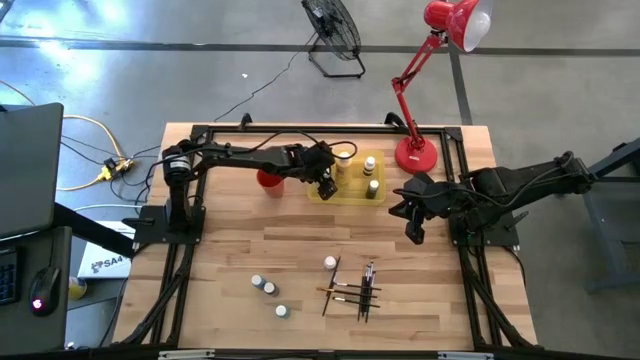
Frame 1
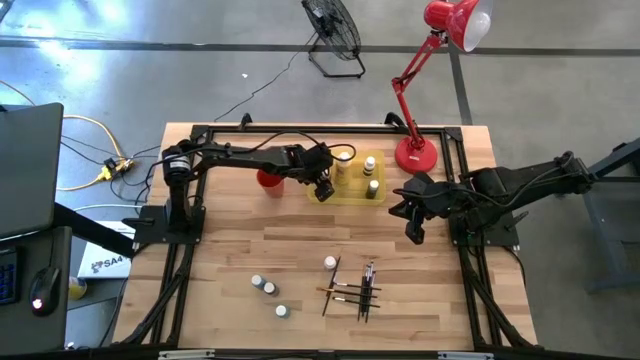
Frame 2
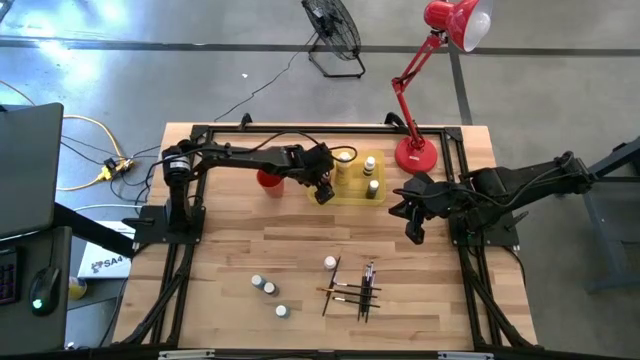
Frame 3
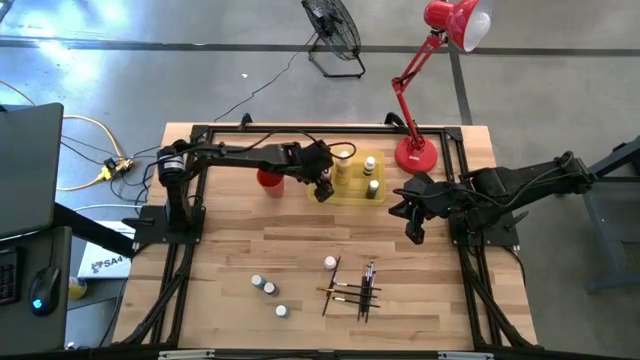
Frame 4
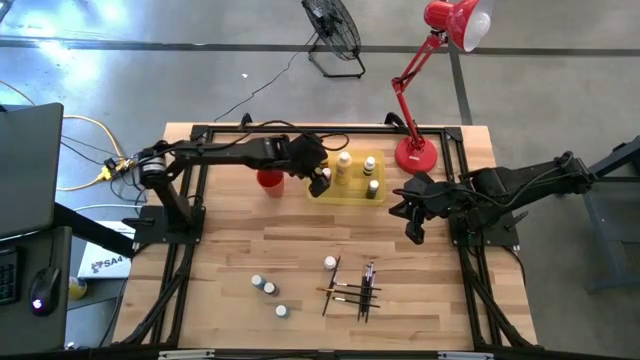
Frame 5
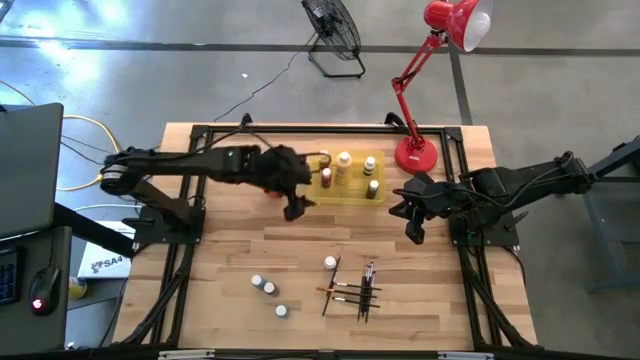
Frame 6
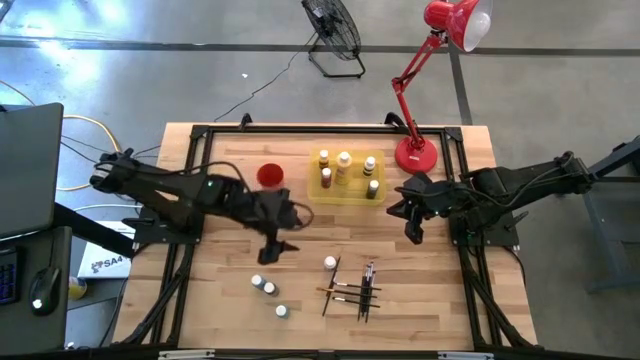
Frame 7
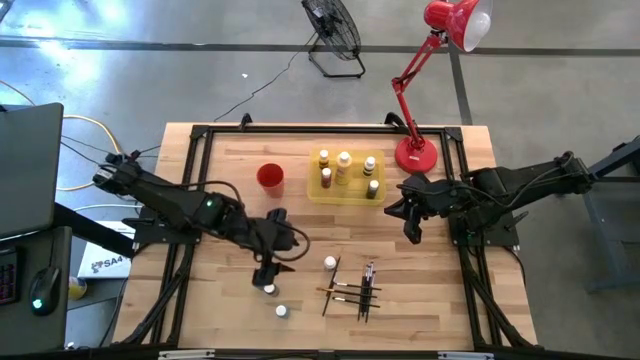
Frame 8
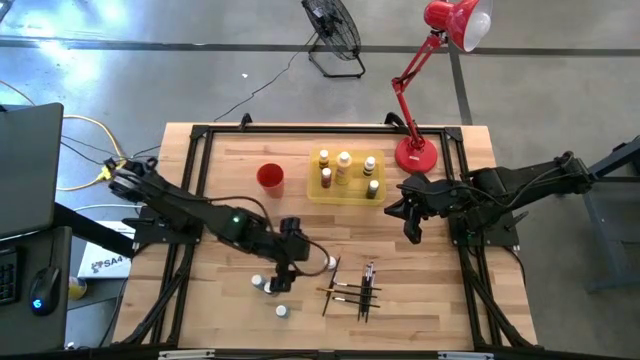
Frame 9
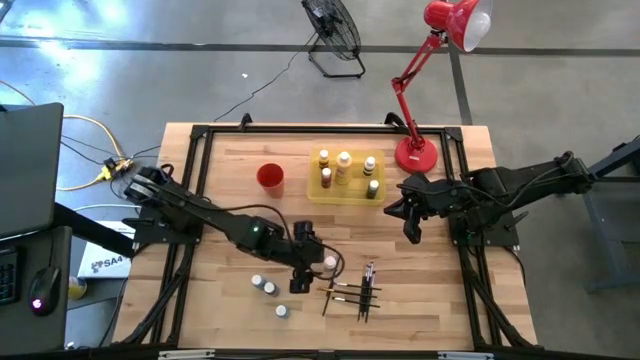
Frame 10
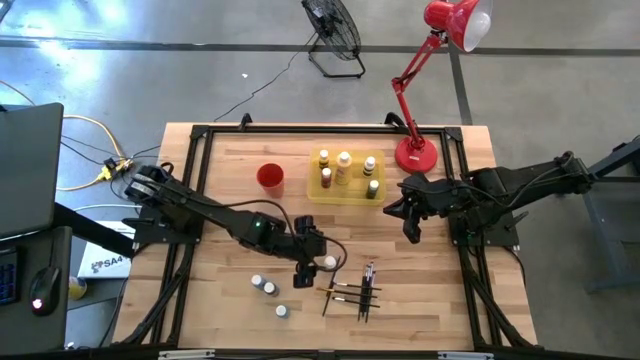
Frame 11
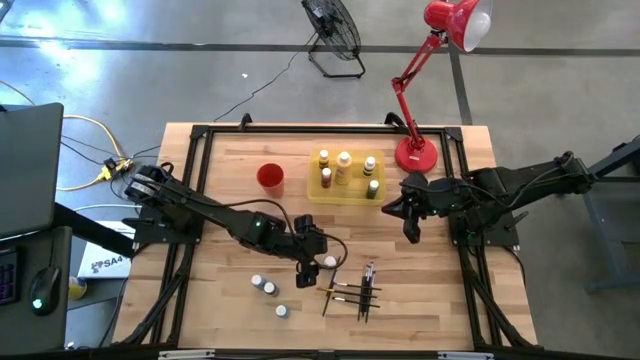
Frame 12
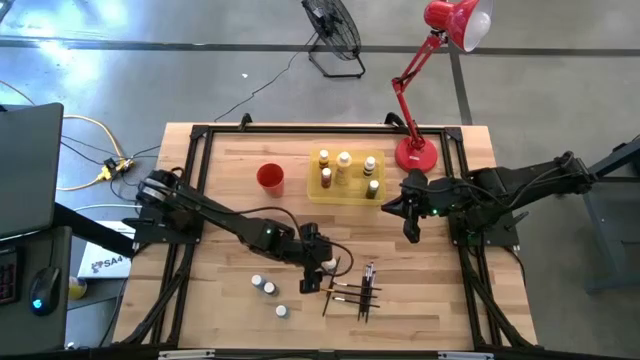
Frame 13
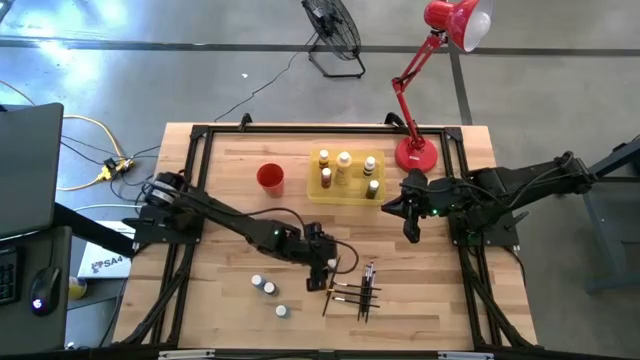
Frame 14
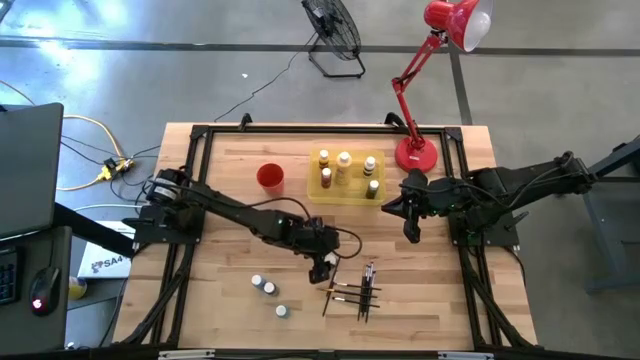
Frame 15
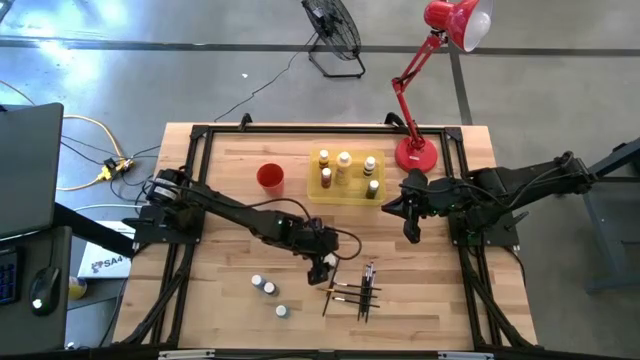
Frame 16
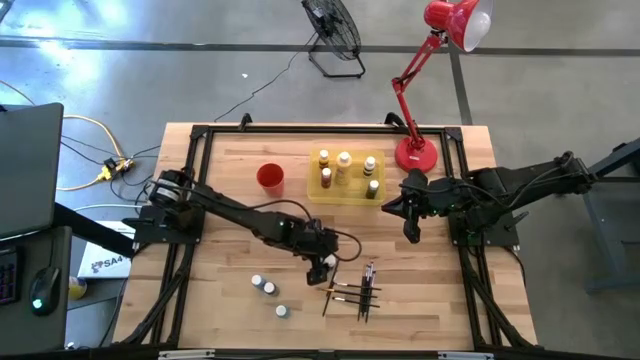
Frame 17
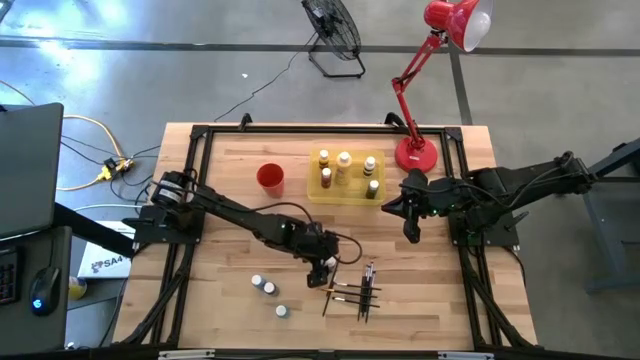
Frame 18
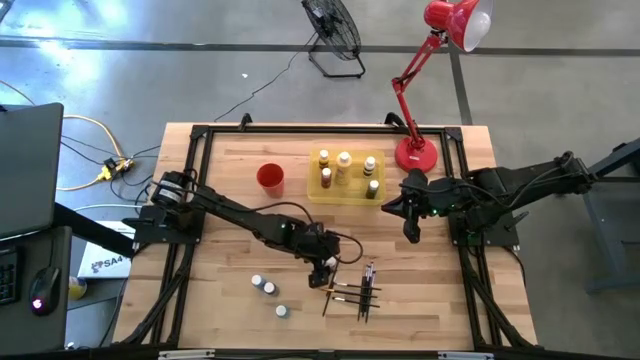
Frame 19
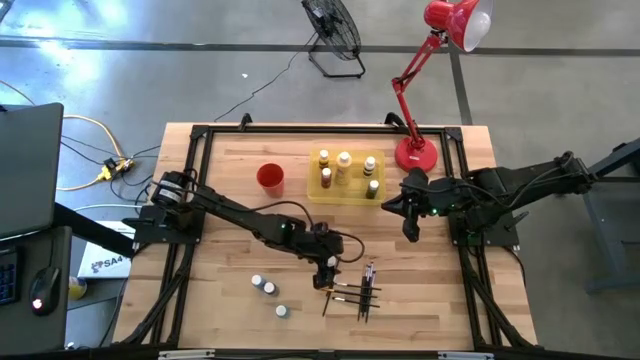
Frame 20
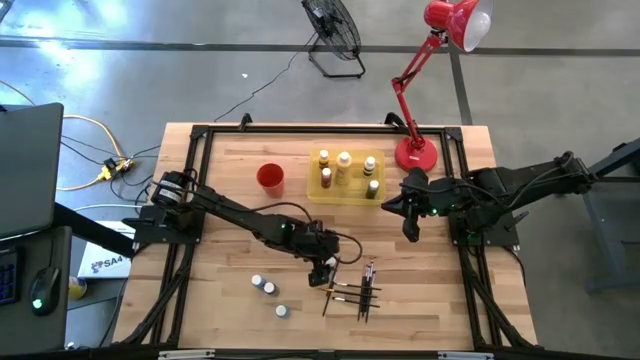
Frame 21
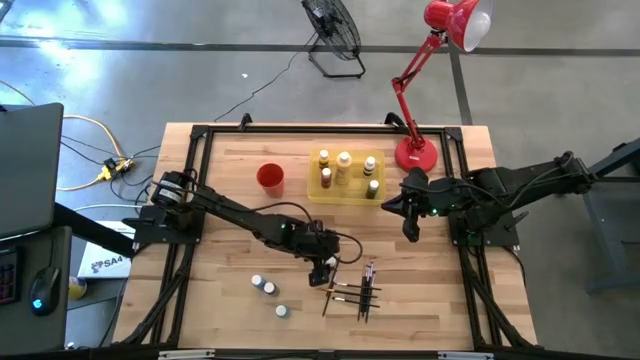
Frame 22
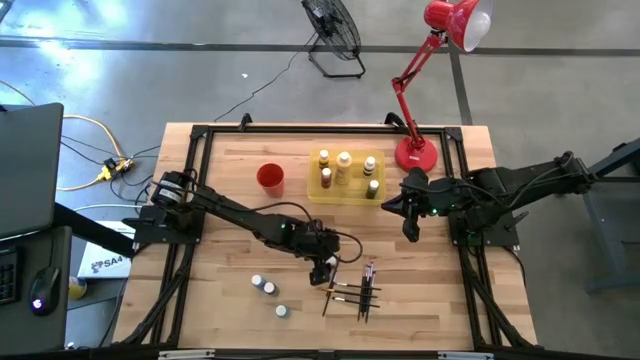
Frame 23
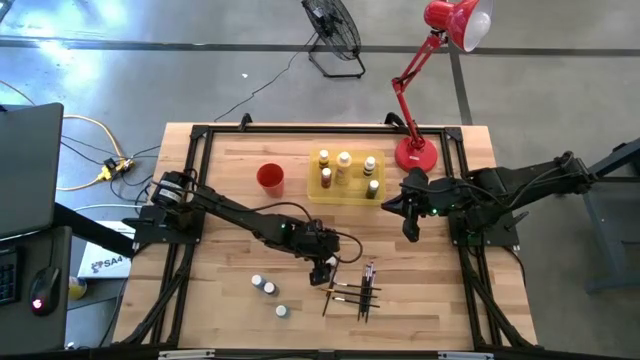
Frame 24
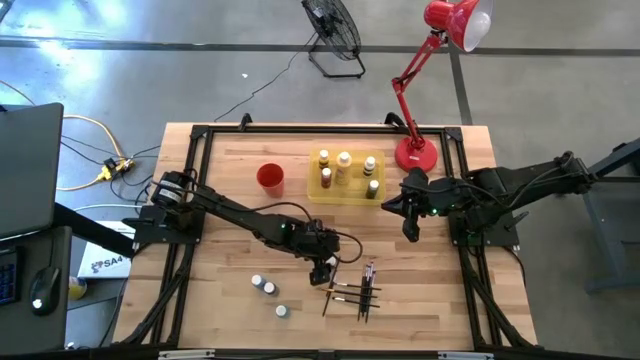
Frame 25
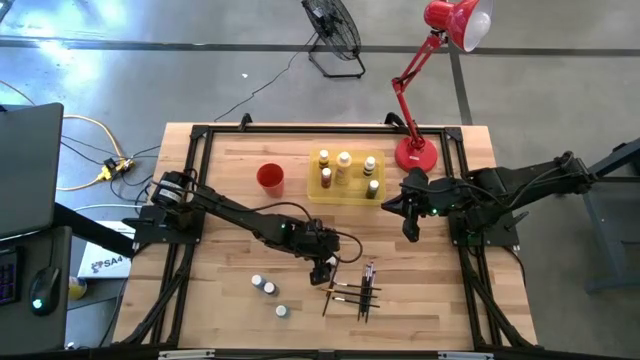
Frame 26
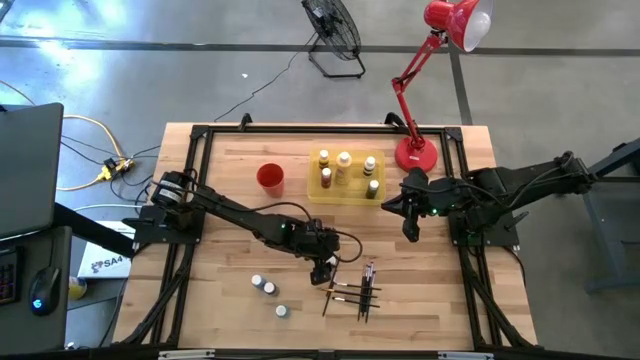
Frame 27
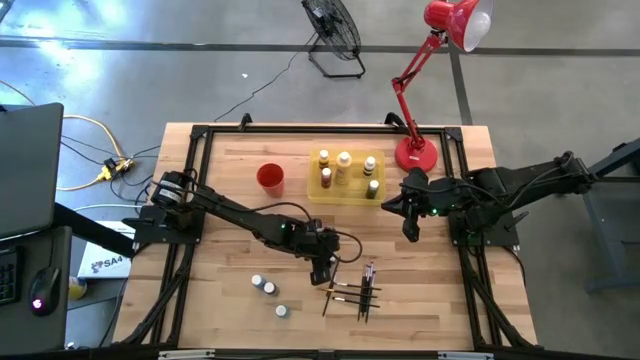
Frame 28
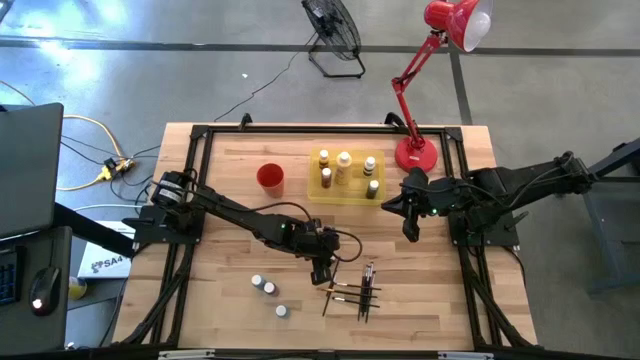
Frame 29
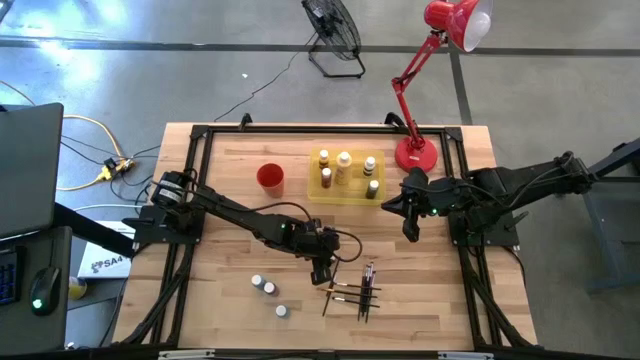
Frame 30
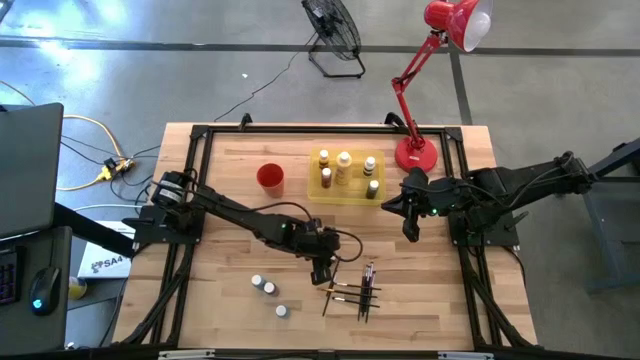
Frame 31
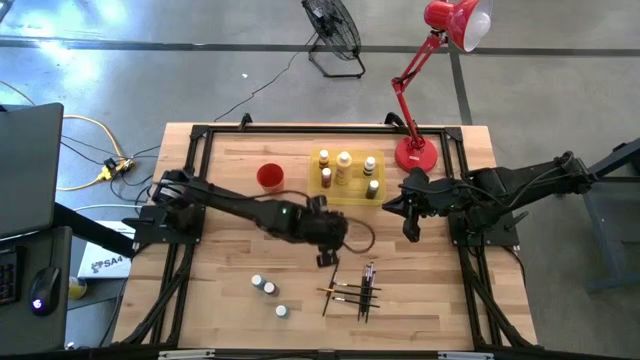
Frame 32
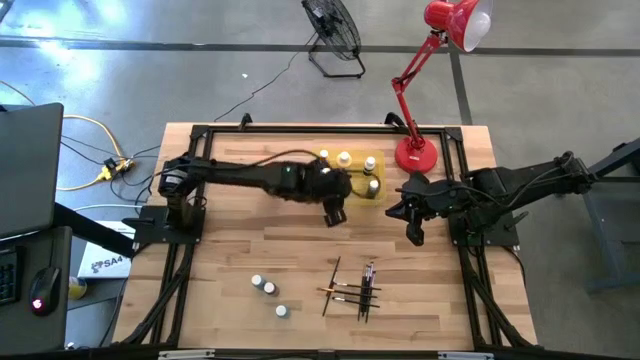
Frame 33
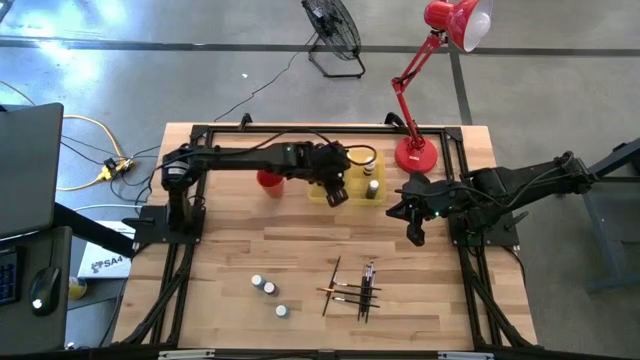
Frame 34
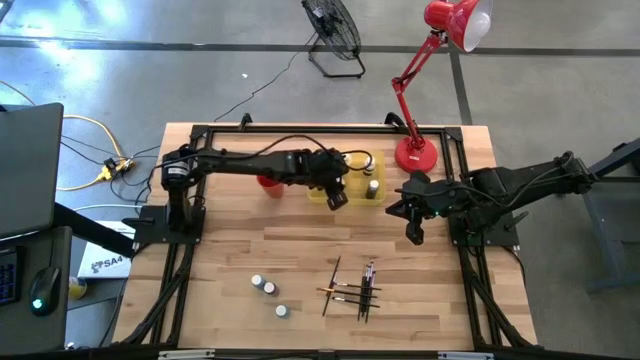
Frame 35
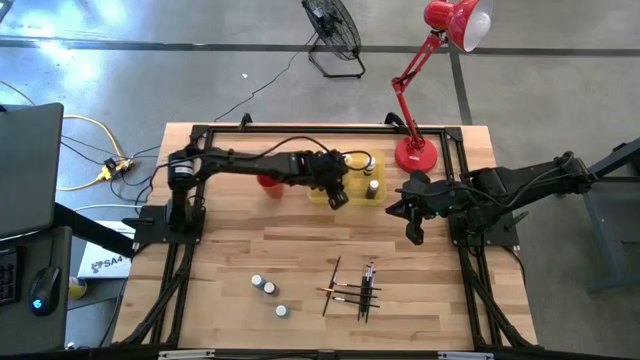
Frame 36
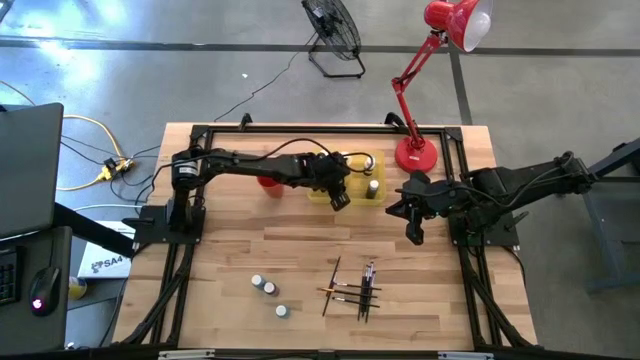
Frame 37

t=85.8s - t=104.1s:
Task: Pick & Place Paint Supplies
Put the white paint bottle into the yellow bin

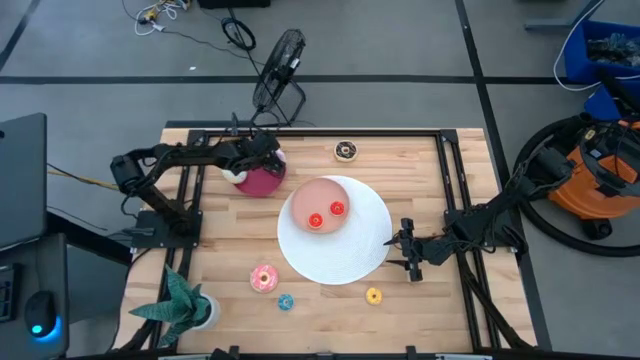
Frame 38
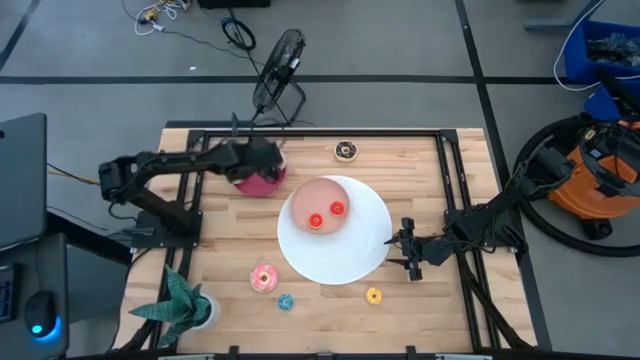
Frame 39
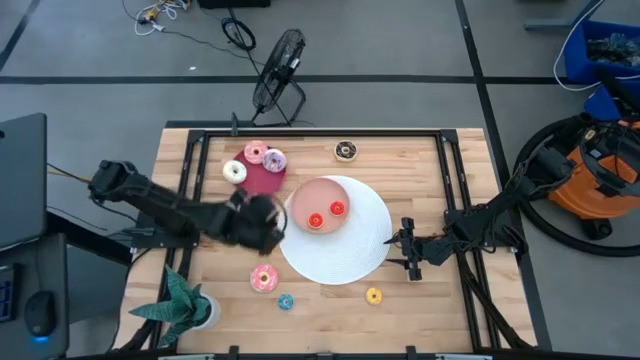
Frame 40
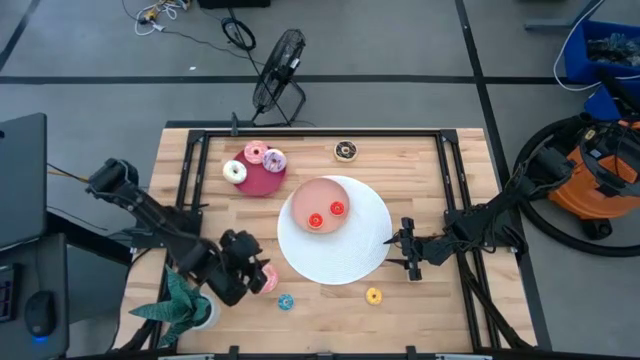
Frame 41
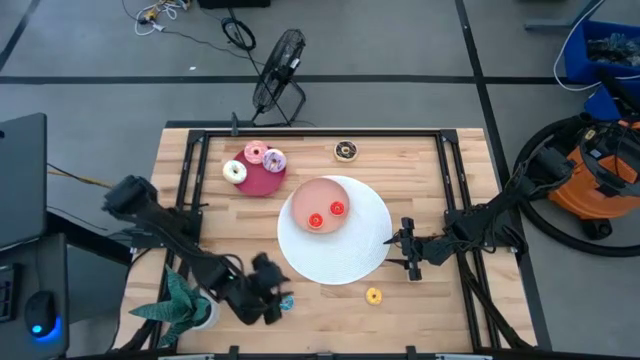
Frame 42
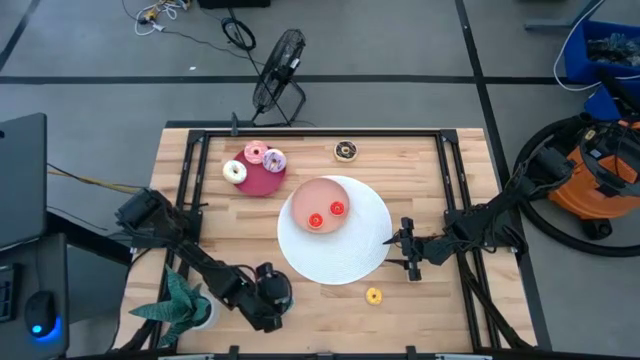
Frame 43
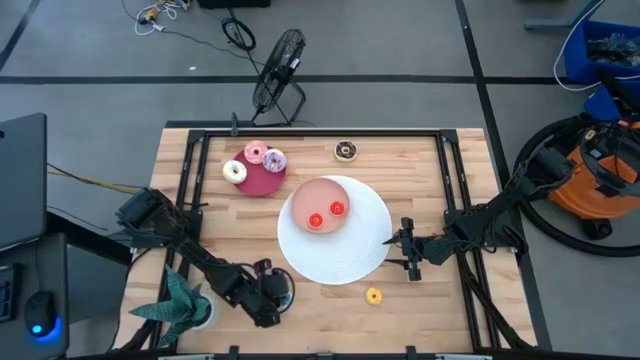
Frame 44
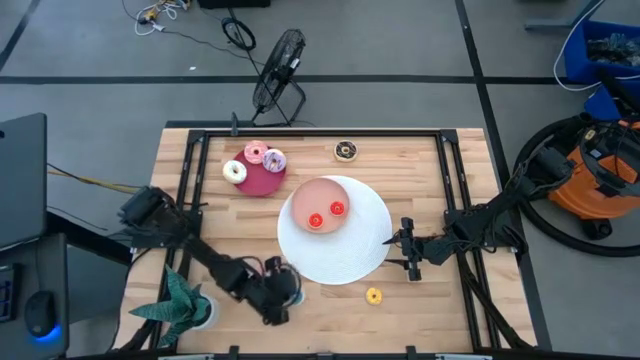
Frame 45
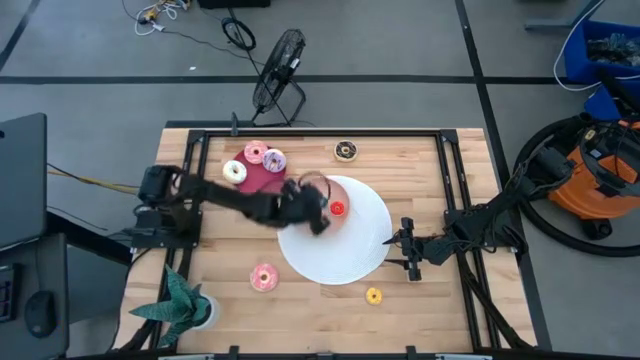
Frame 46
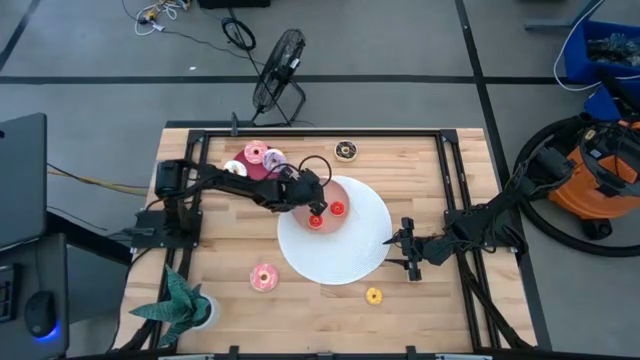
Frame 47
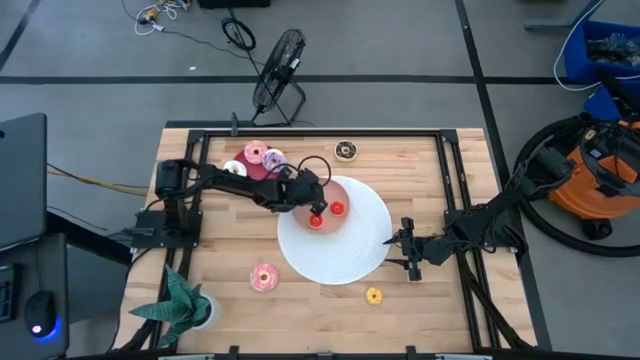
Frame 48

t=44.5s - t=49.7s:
Task: Pick & Place donuts
Put the small blue donut on the light pink plate
